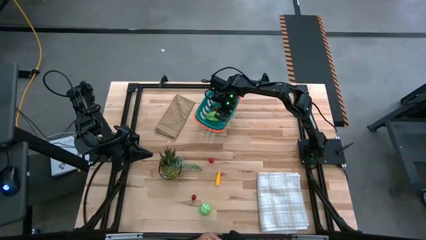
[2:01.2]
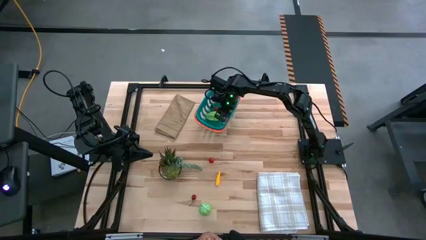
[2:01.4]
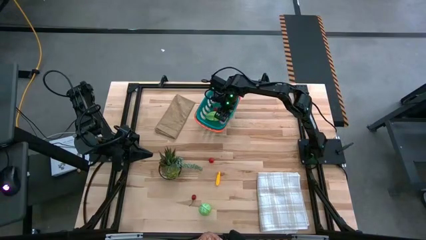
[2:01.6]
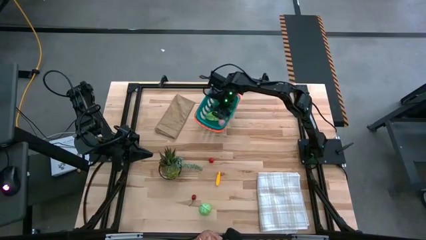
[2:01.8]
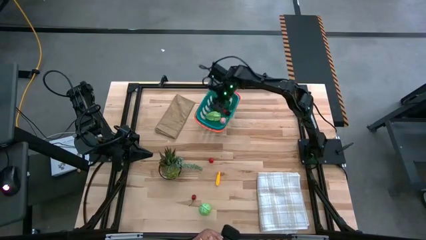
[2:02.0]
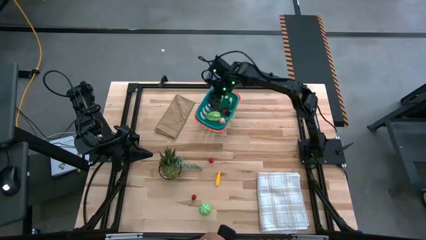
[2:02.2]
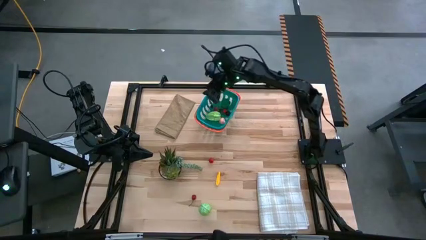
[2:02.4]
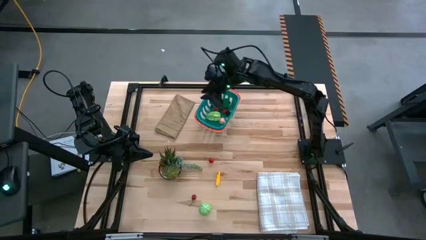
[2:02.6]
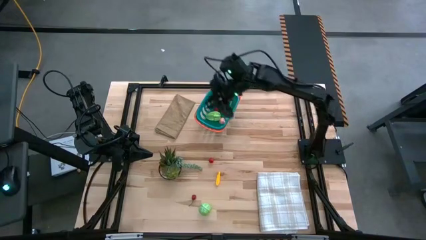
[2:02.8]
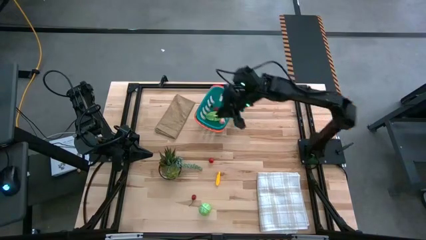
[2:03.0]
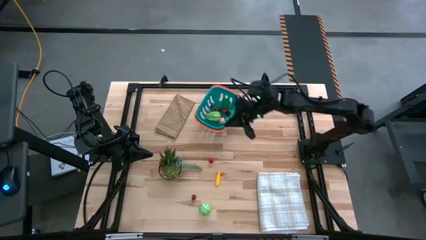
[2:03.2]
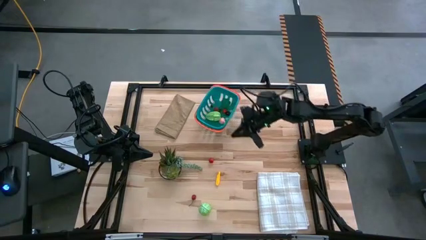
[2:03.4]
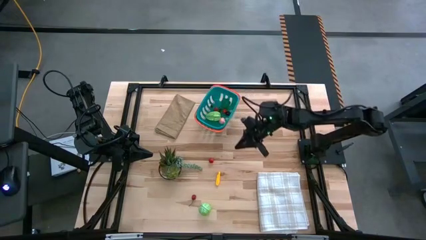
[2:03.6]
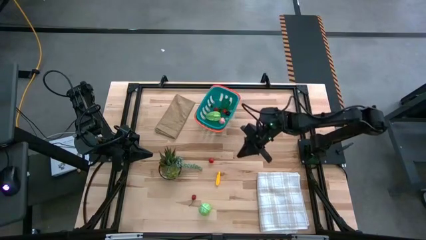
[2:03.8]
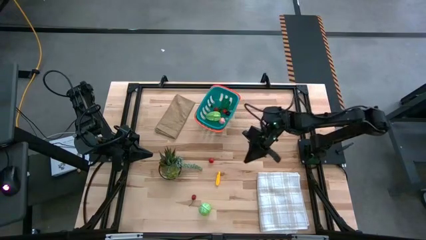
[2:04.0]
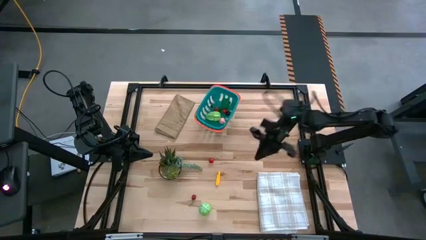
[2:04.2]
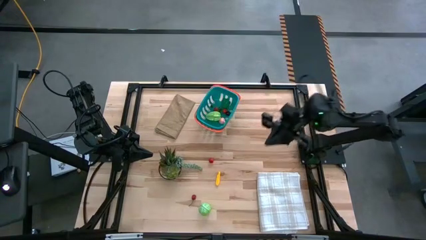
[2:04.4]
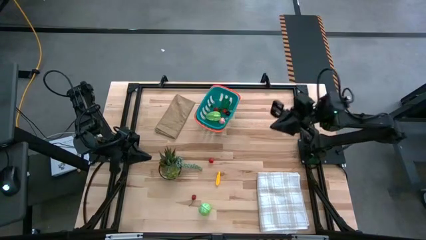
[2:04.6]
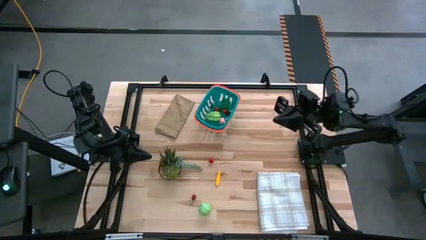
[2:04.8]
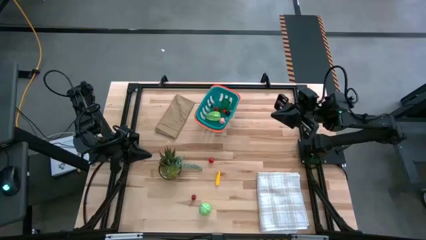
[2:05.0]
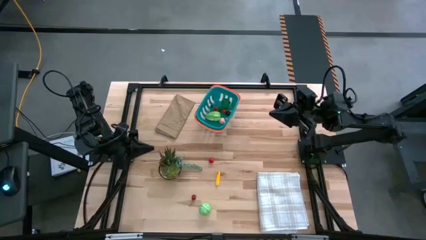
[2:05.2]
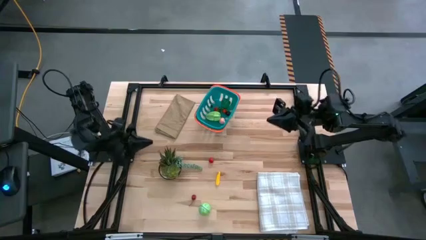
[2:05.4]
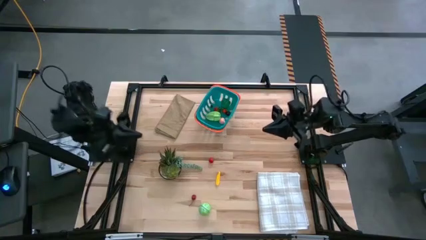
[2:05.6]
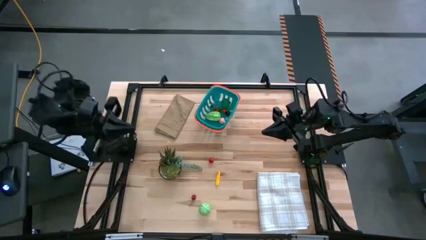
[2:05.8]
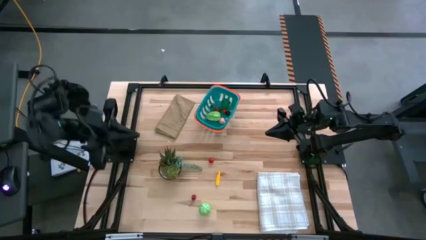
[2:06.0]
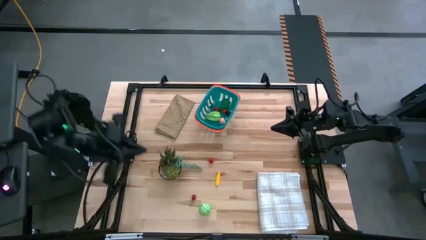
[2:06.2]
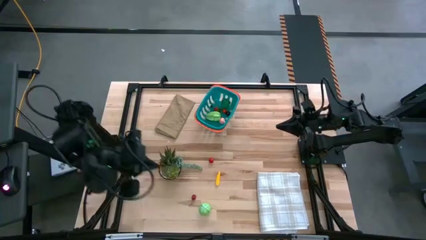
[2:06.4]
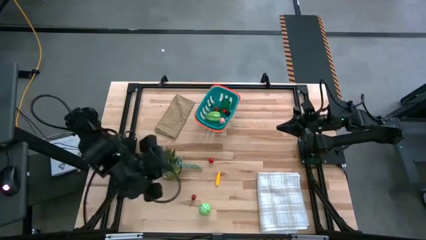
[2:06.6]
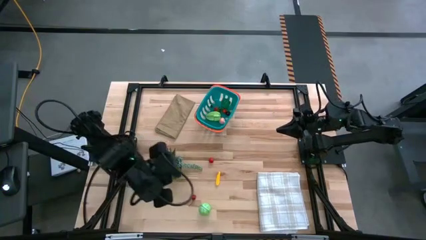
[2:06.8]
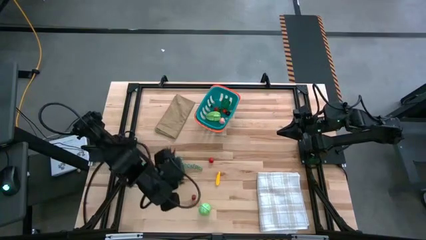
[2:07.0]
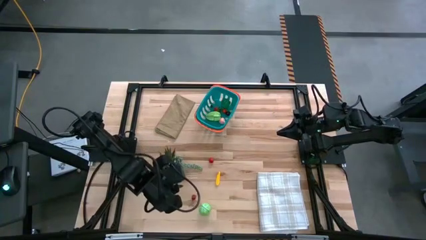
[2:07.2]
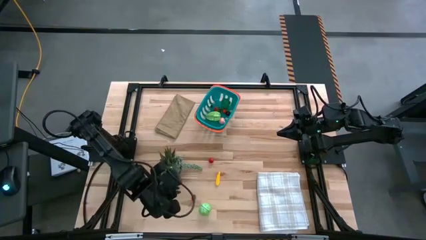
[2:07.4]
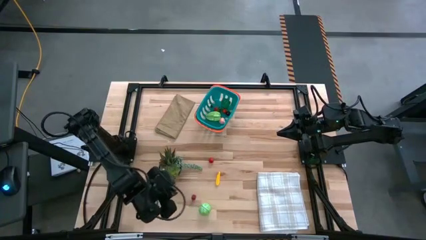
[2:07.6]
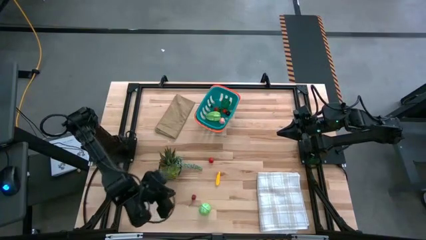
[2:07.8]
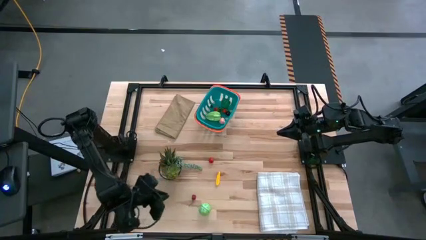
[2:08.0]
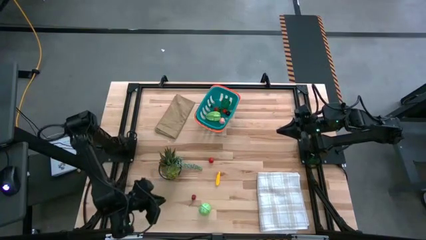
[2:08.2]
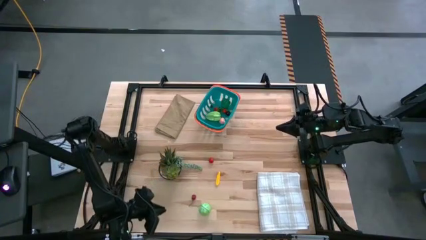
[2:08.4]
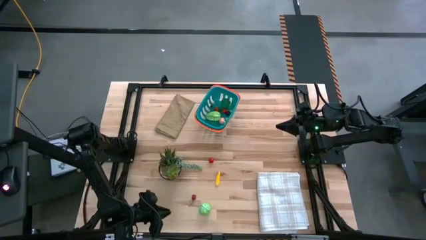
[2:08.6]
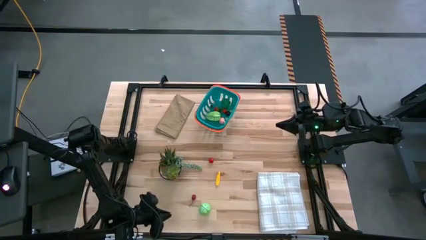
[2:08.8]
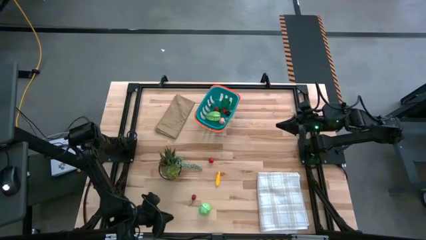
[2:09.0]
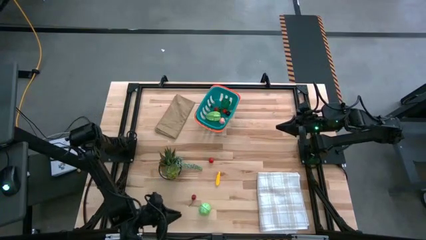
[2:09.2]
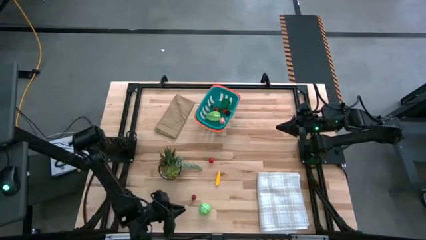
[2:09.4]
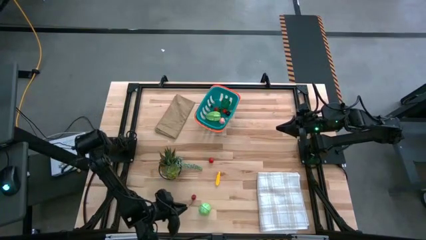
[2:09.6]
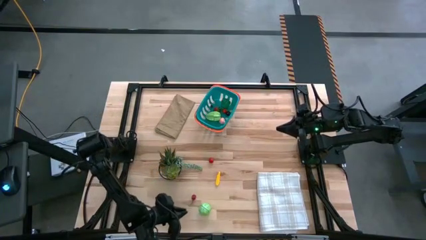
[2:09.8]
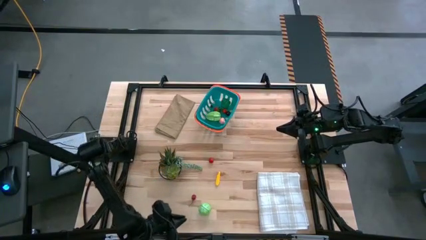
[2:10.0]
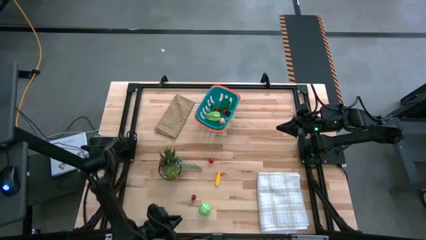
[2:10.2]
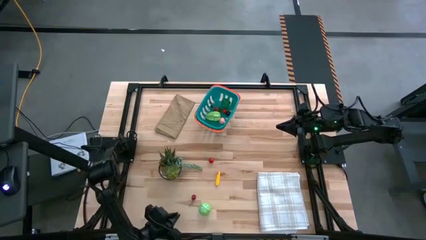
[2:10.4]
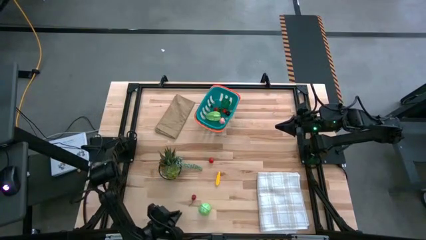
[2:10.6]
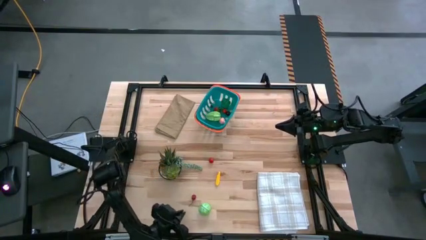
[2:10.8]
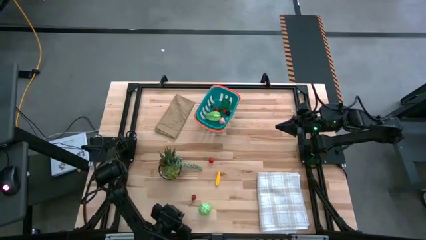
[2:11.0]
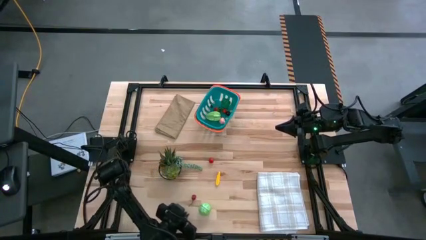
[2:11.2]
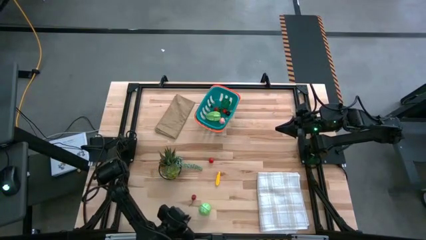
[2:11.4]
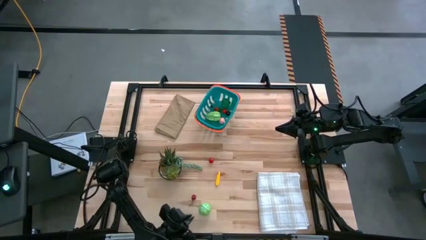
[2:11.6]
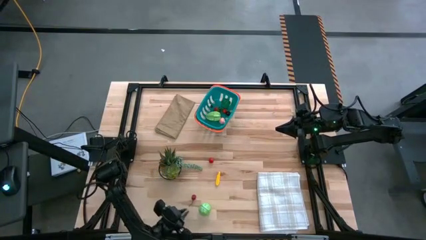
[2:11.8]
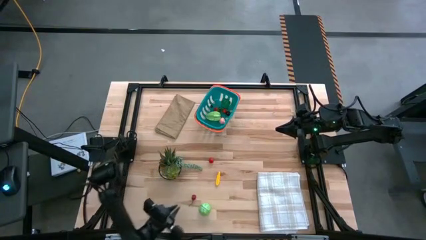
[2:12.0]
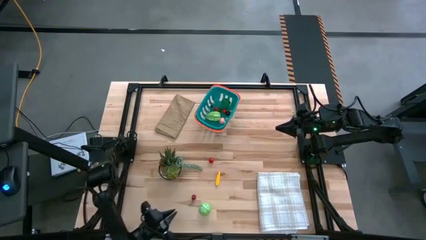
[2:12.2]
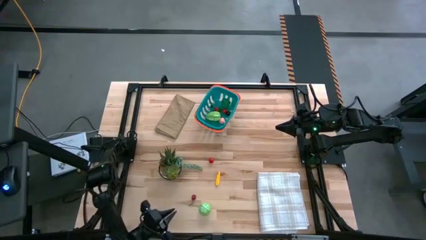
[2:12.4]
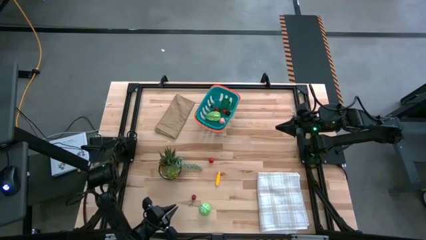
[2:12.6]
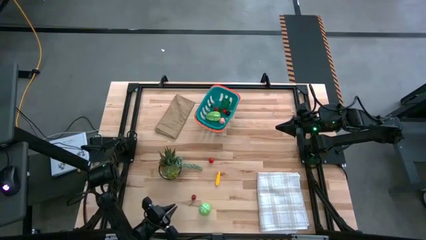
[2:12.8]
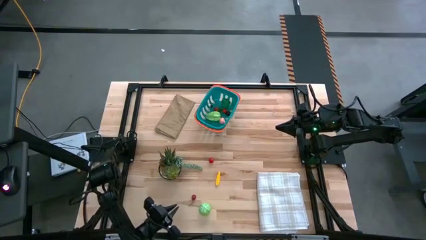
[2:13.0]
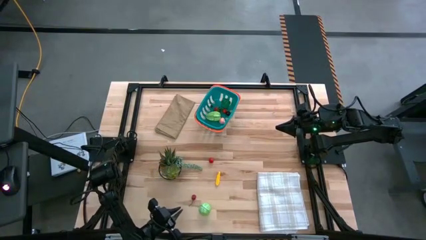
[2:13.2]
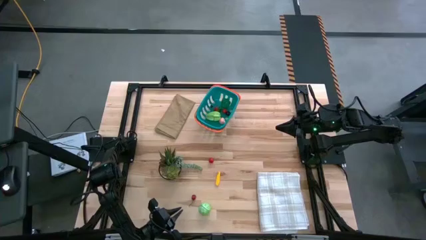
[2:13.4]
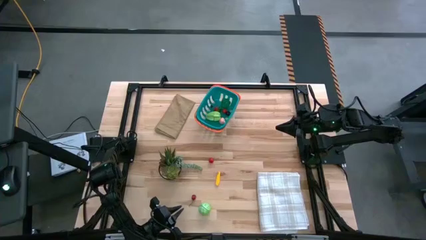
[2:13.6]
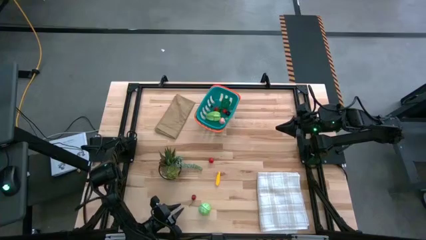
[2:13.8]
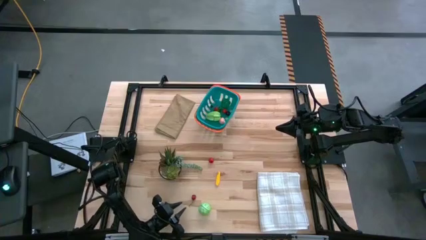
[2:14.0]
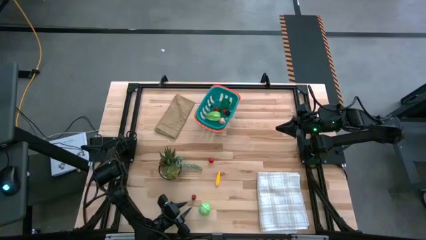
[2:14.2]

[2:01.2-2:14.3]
Task: Pick and placing Produce into tupperware
Put the red cherry in the green basket
